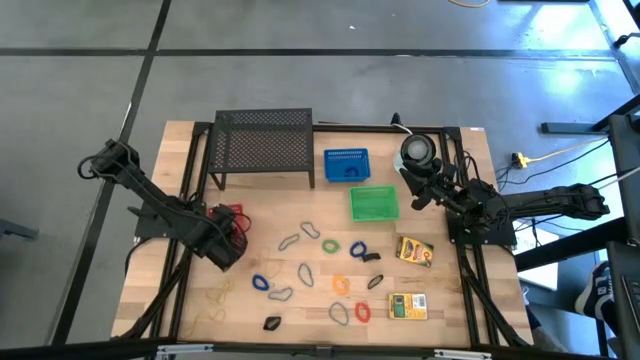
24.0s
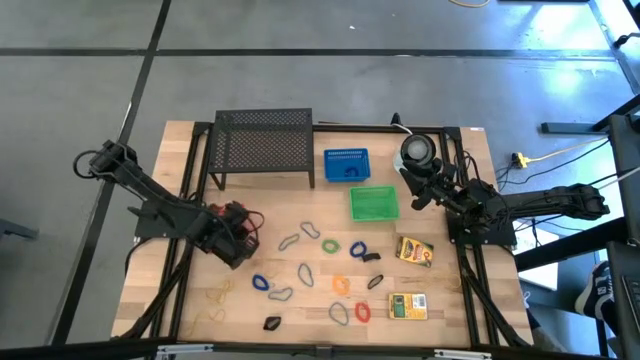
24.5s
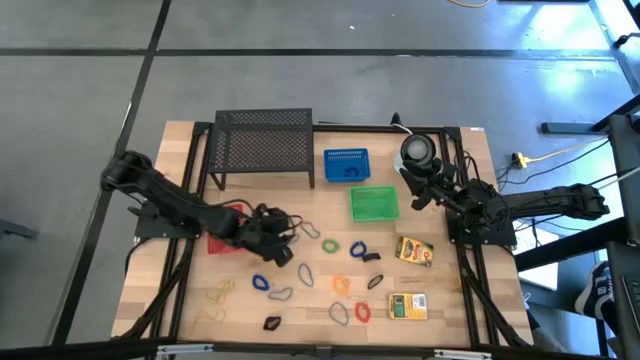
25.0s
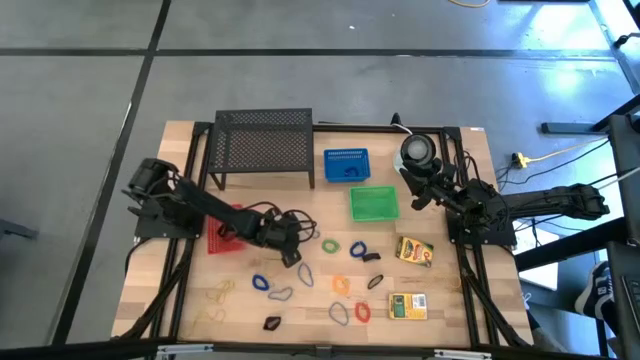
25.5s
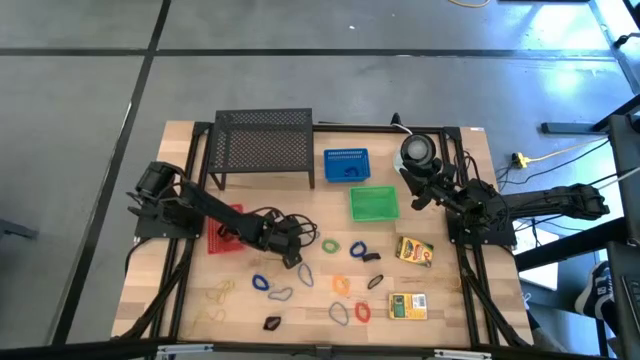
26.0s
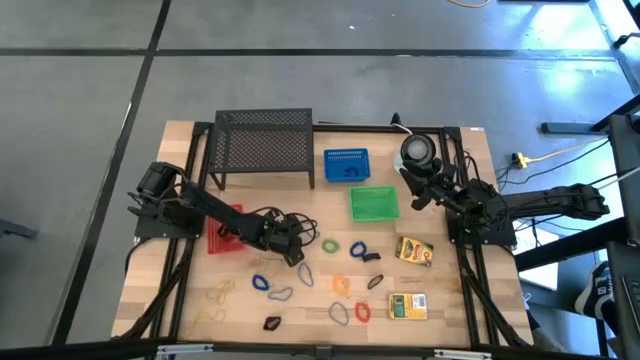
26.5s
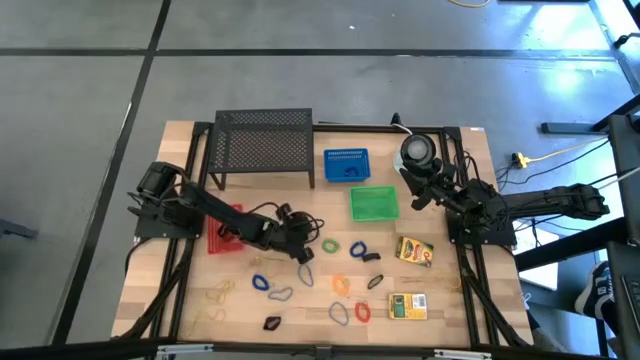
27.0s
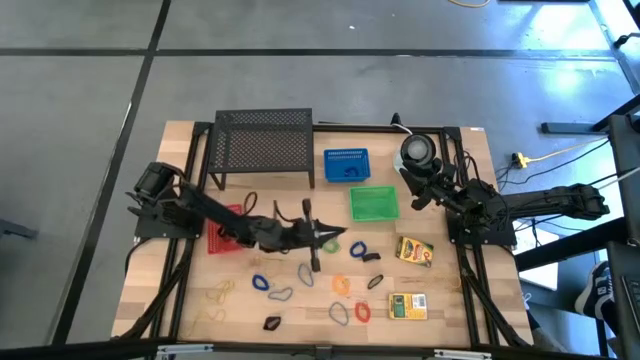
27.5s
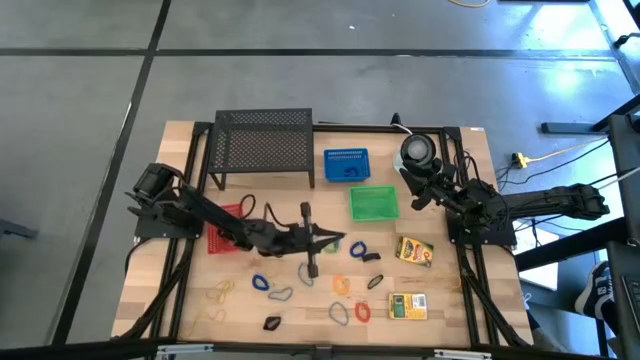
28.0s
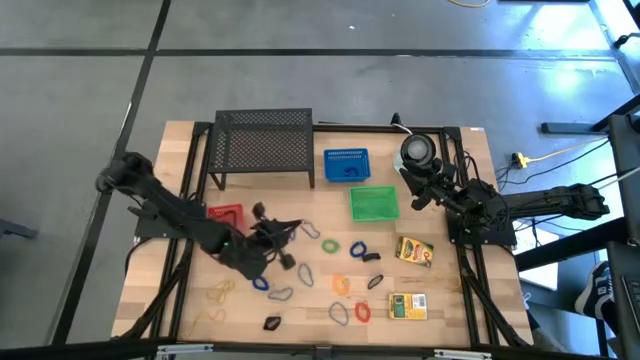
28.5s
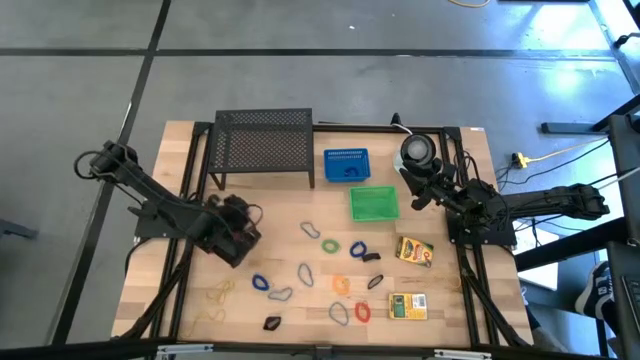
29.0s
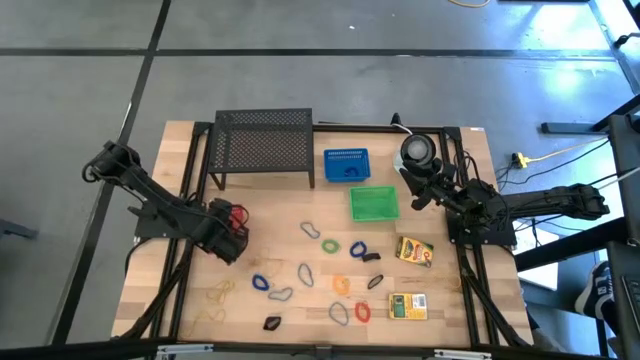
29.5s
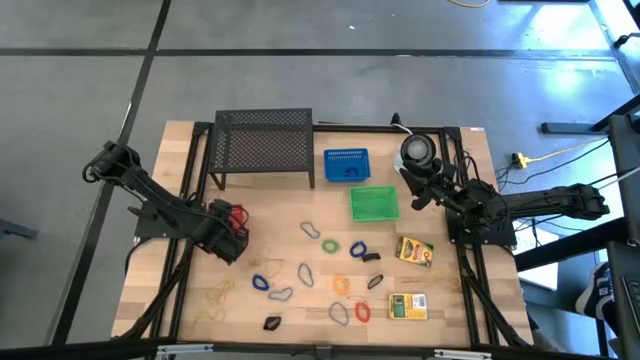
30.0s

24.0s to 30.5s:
Task: Pick & Place Office Desk Supplies
Put the blue rubber band into the orange basket

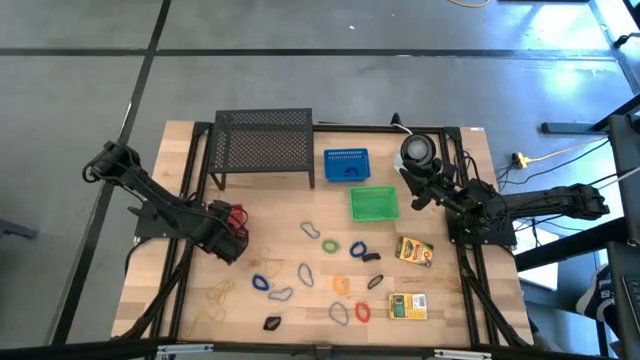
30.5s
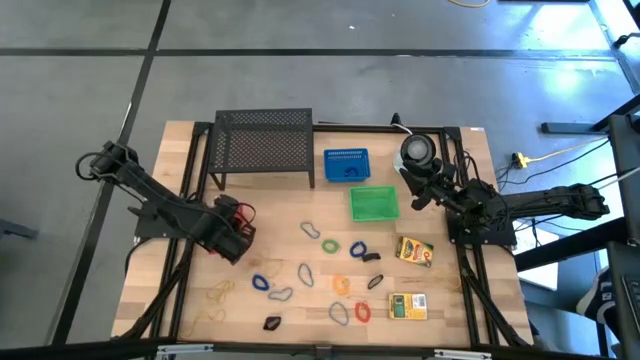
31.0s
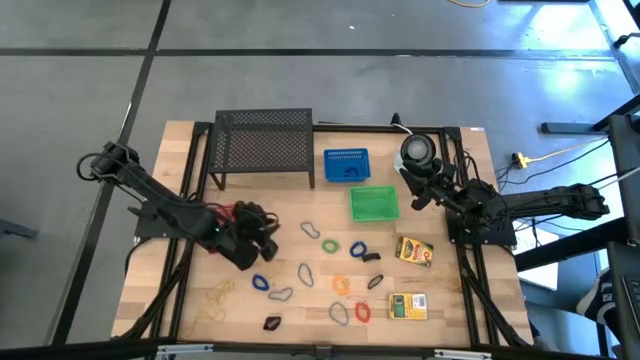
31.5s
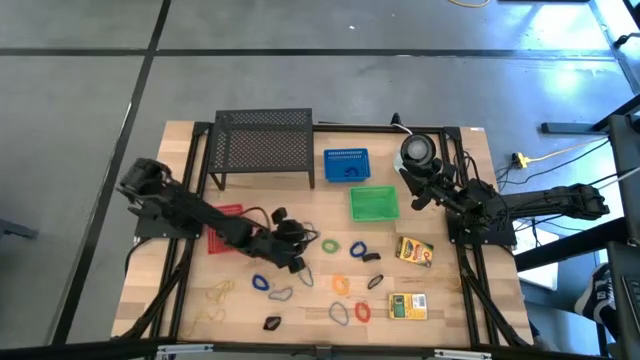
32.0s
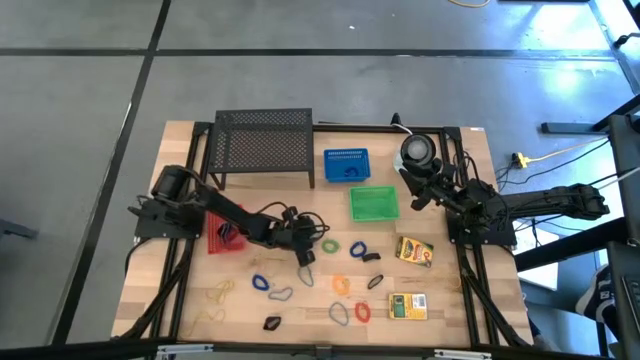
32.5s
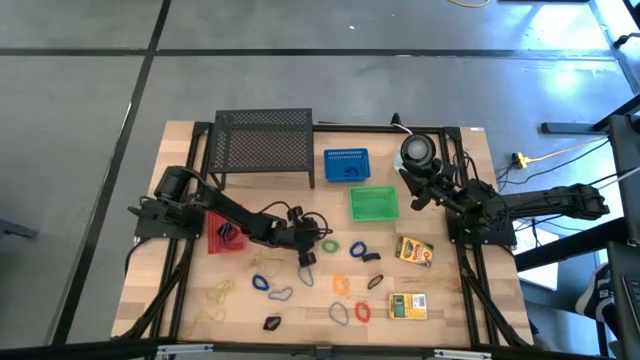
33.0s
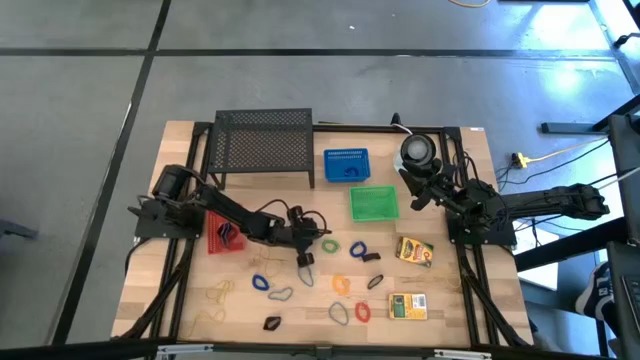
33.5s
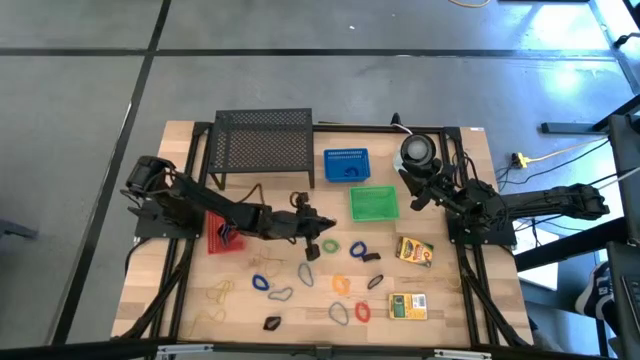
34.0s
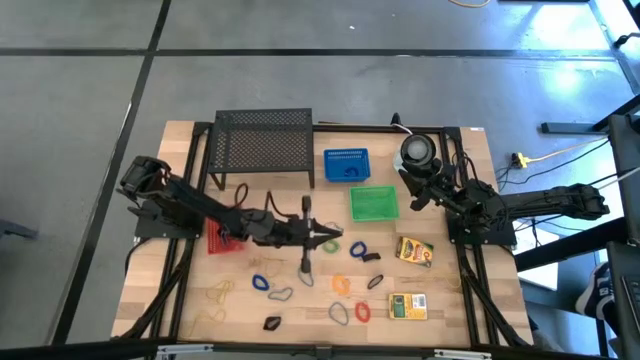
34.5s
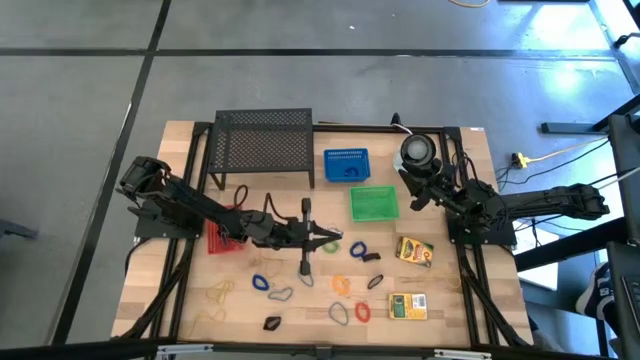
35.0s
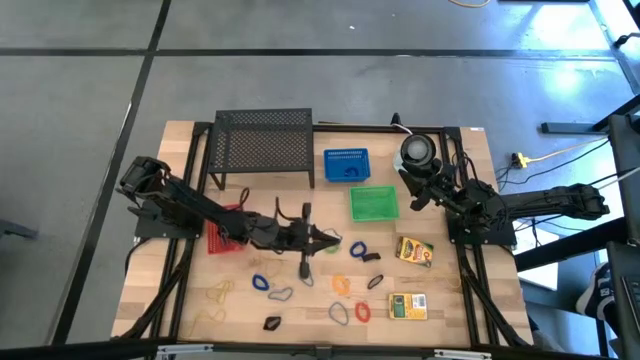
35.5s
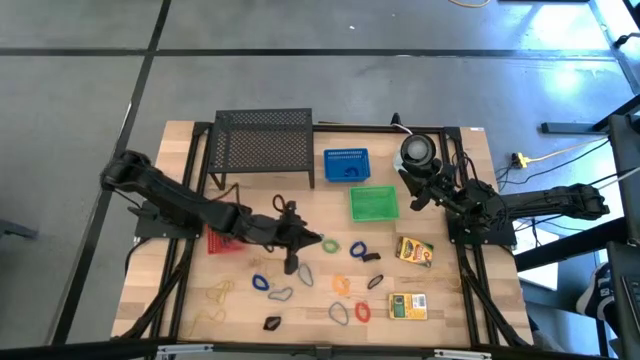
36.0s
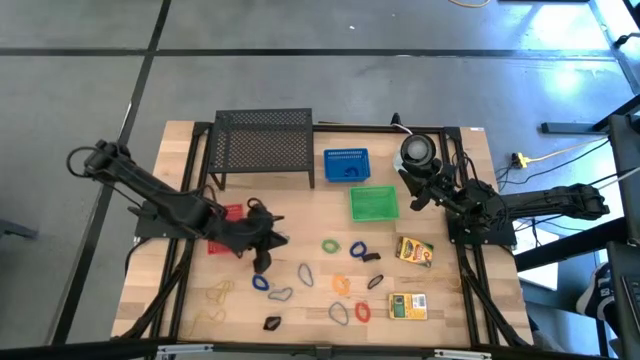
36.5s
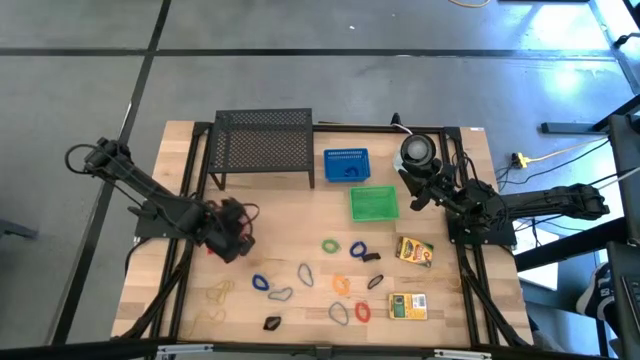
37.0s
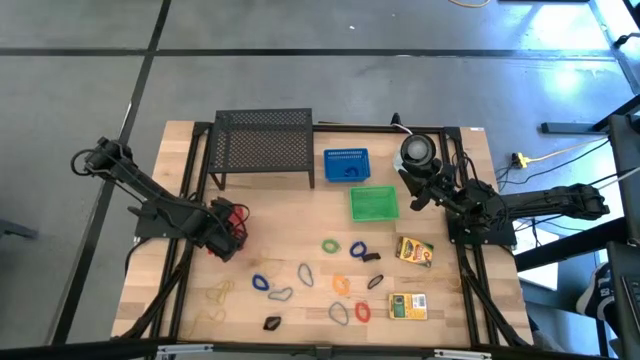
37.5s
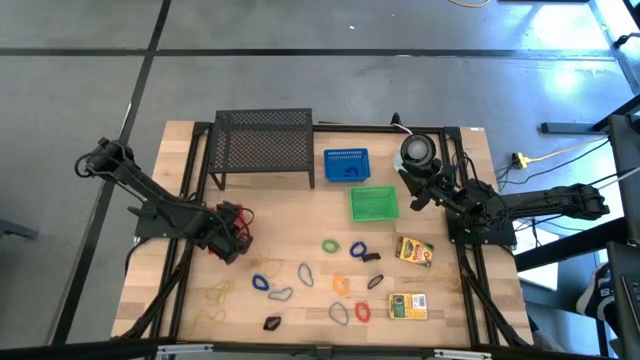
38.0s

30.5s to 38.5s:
Put the blue rubber band into the orange basket

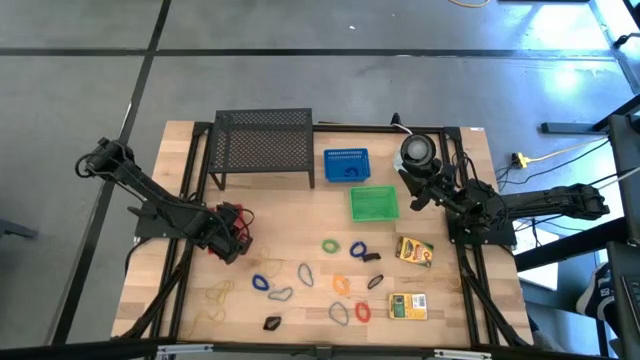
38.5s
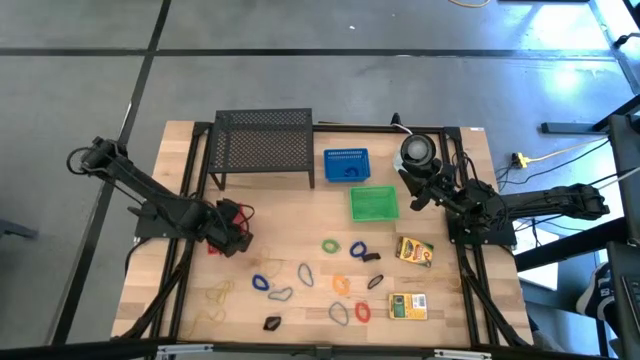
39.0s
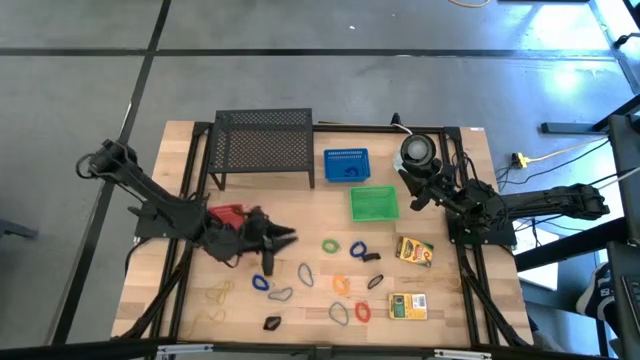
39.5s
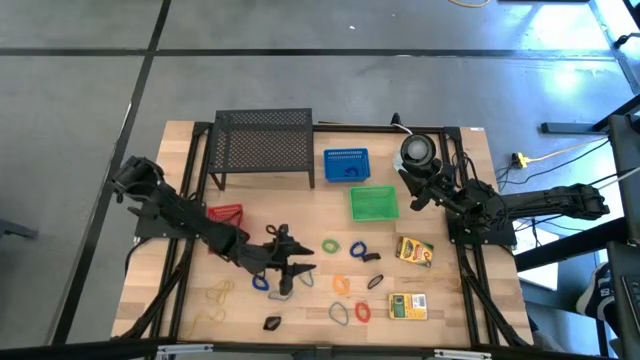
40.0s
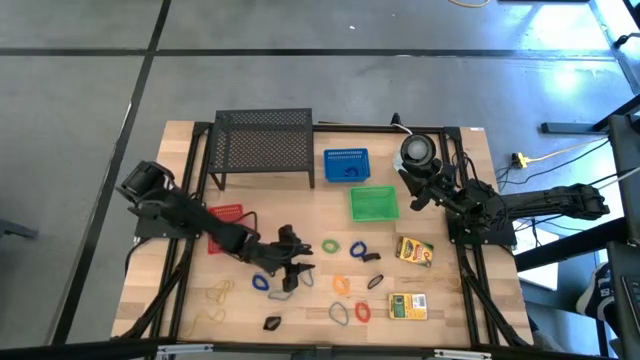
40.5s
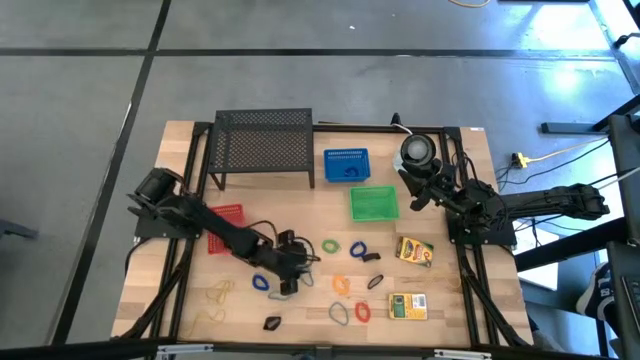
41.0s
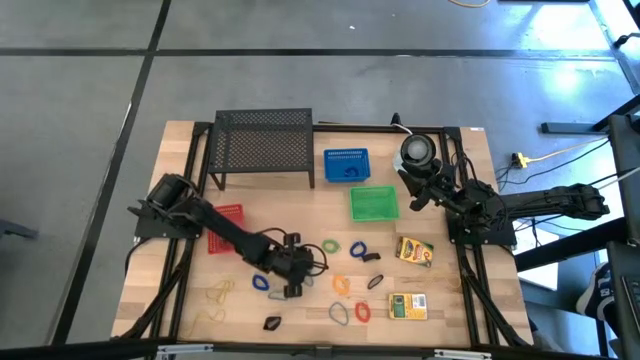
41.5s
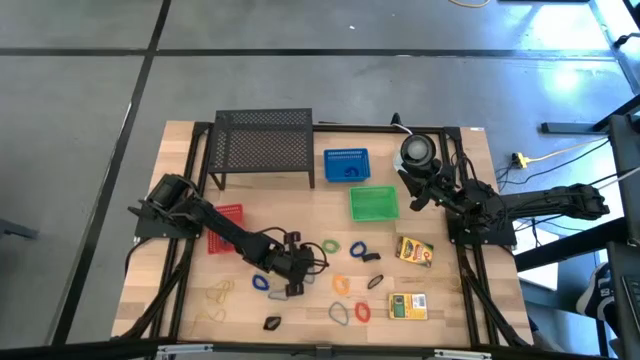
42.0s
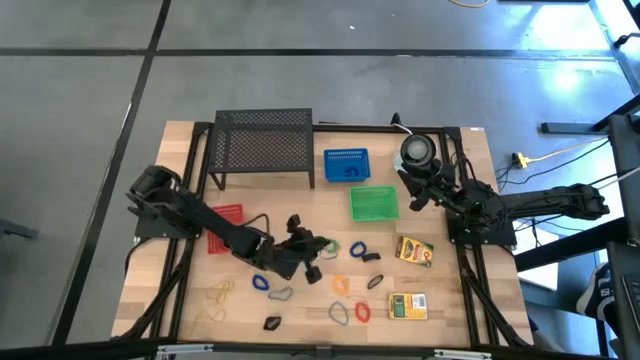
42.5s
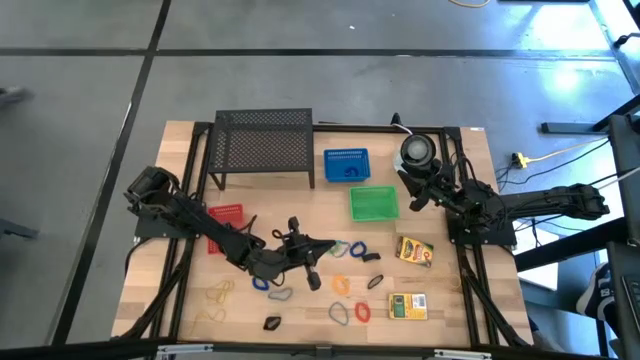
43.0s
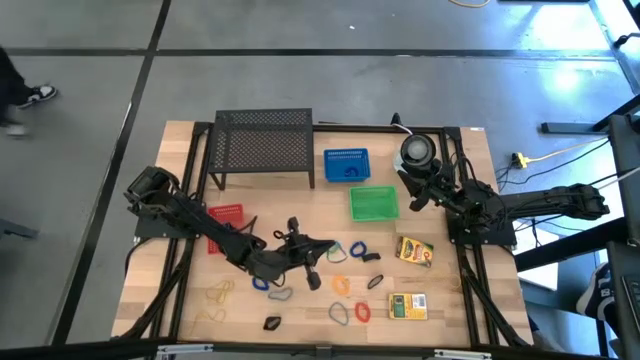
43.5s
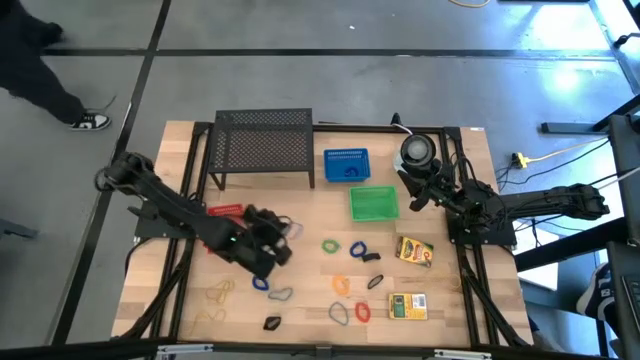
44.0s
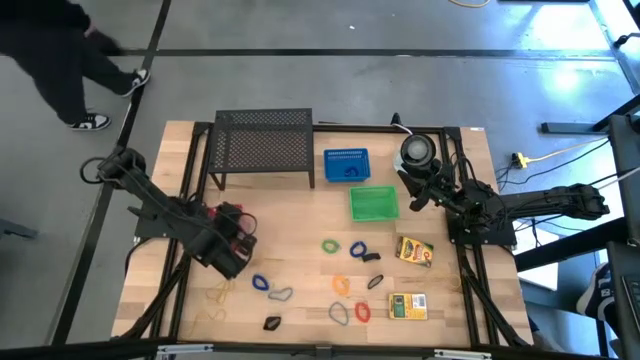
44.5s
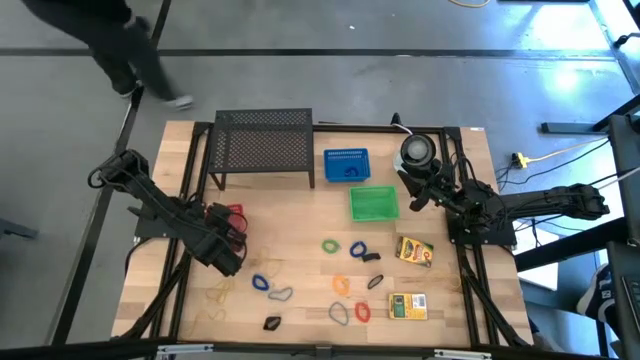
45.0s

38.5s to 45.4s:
Put the blue rubber band into the orange basket

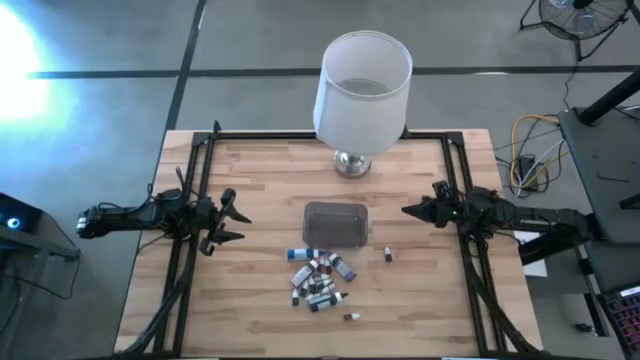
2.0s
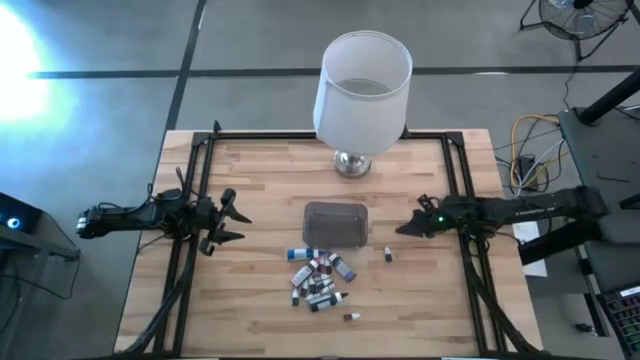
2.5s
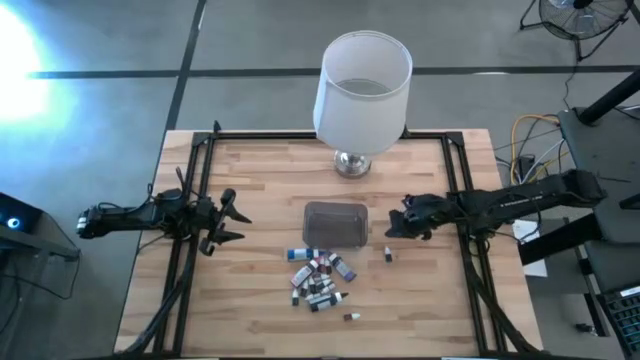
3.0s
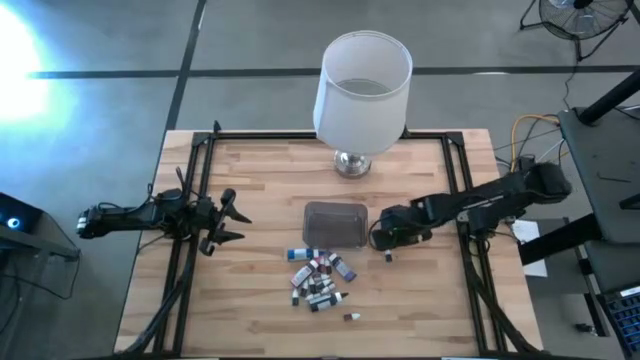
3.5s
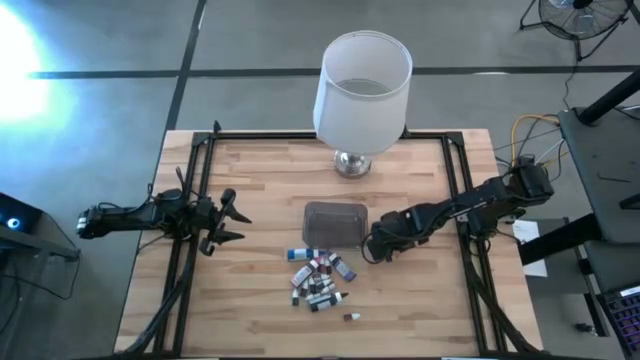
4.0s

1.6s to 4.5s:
Task: Pick & Place food coloring
Put the small blue food coloring into the black bin
